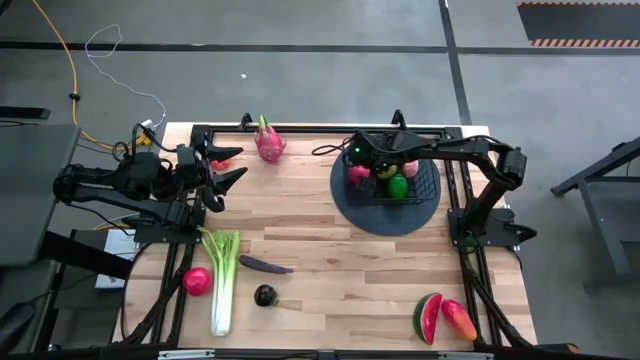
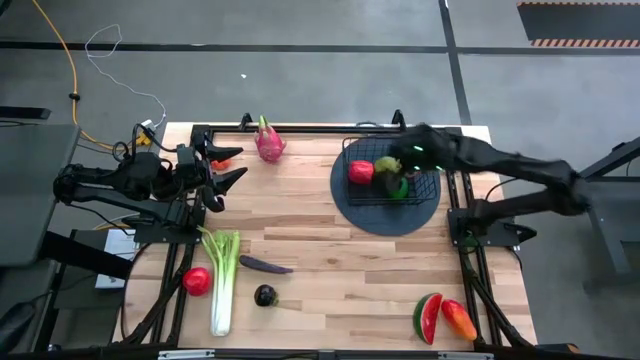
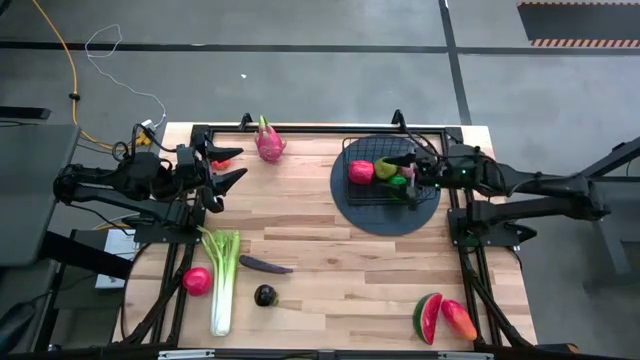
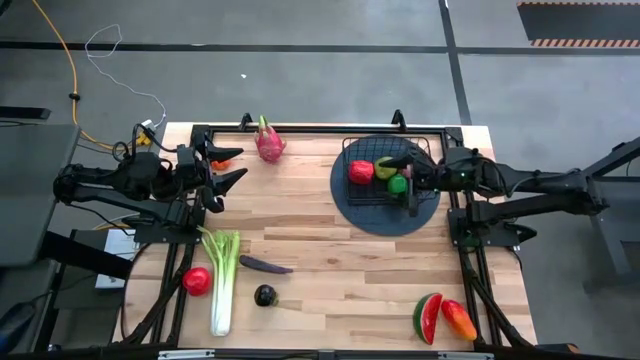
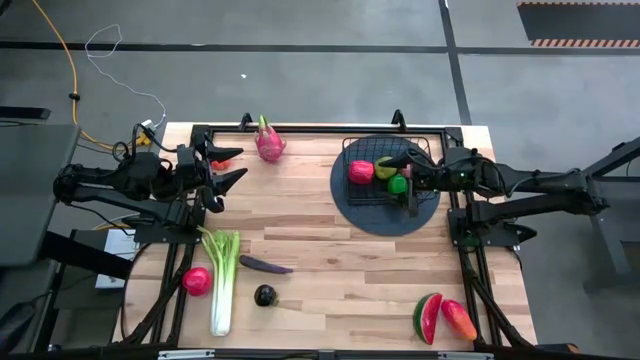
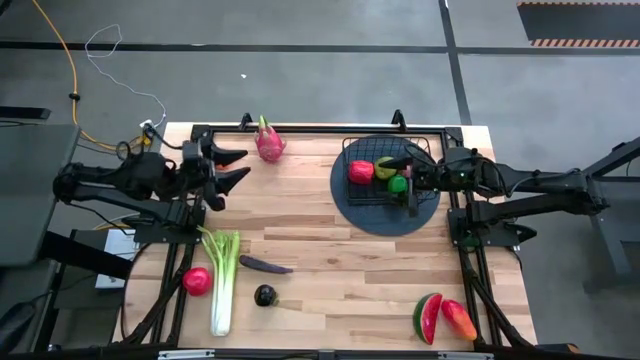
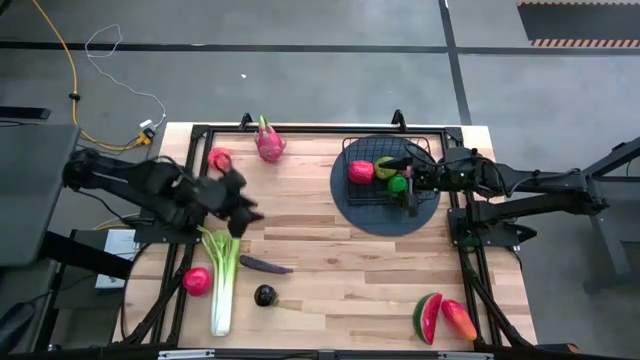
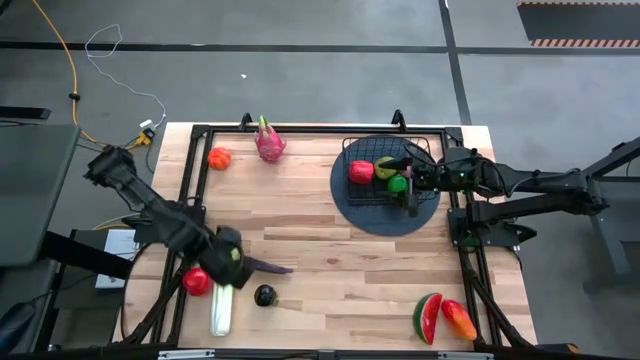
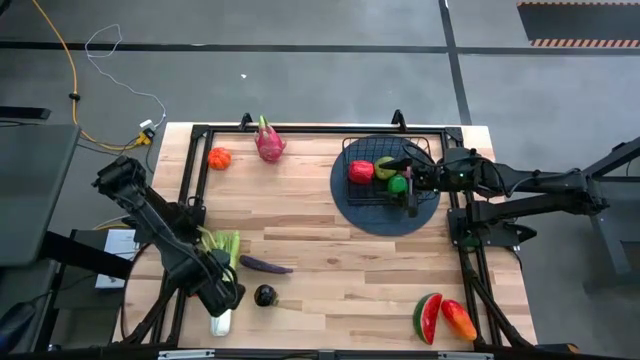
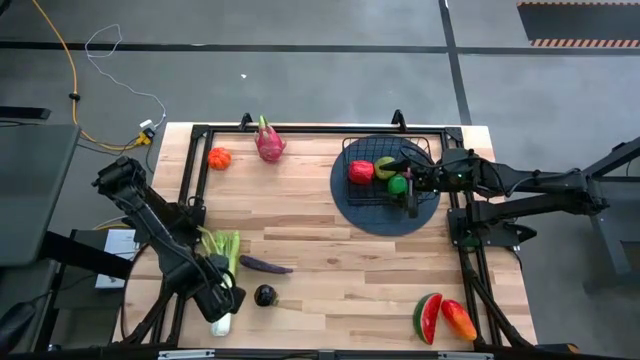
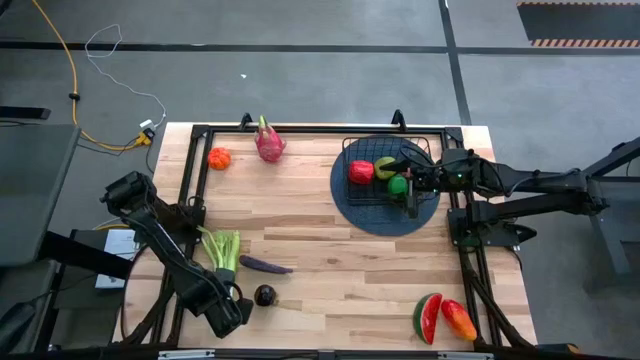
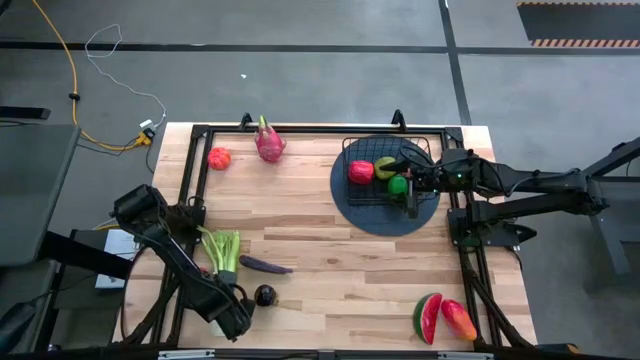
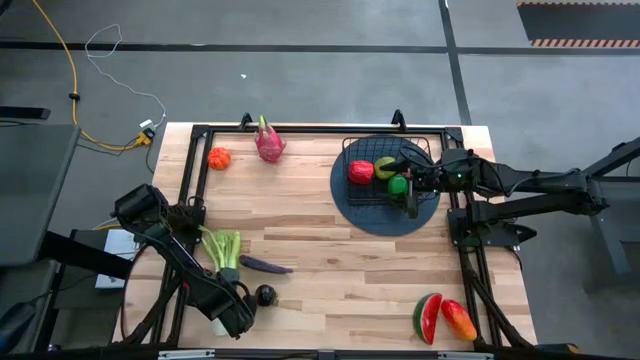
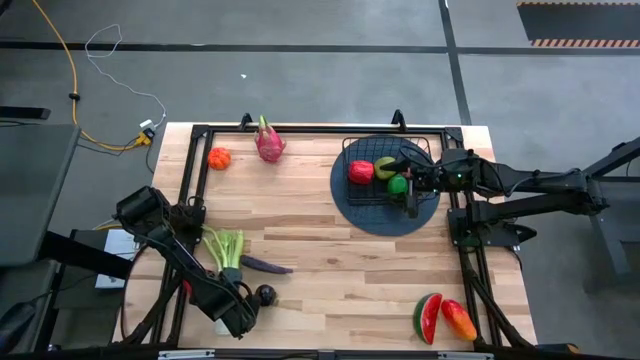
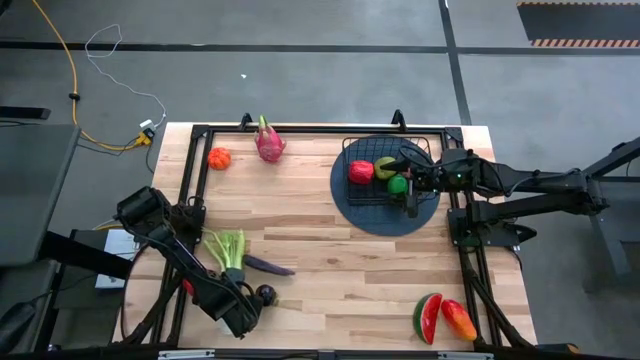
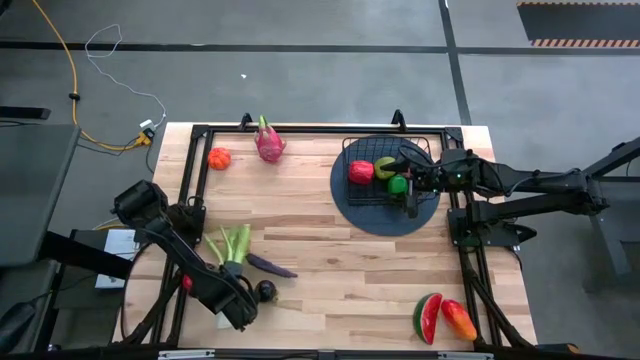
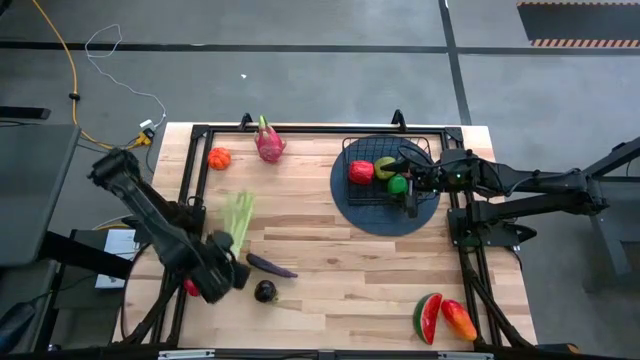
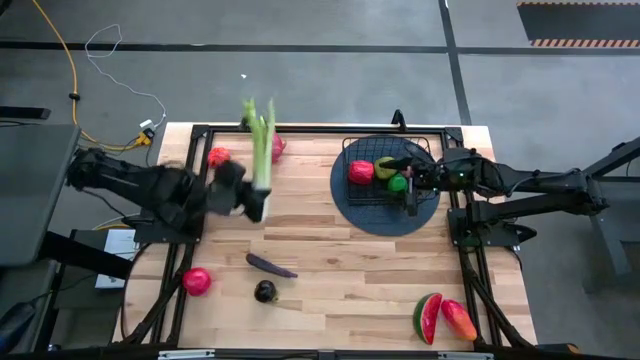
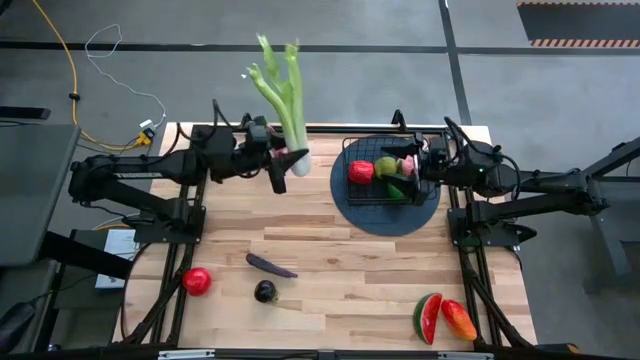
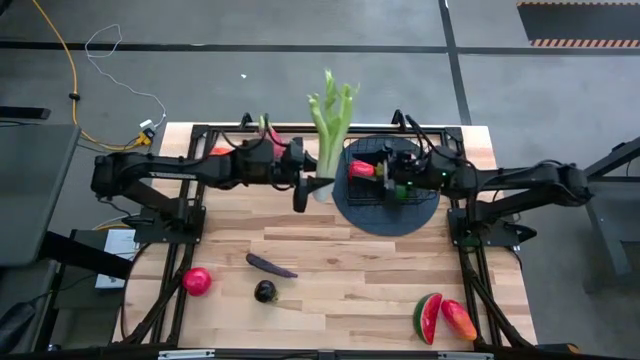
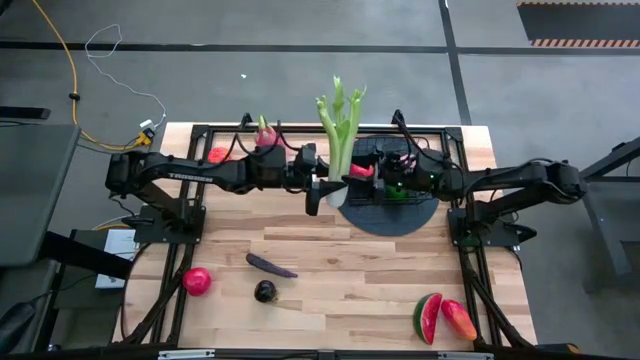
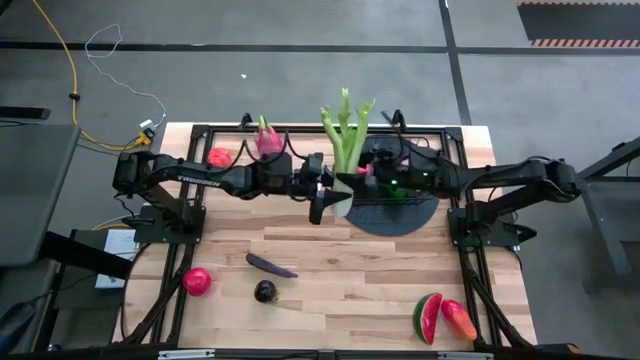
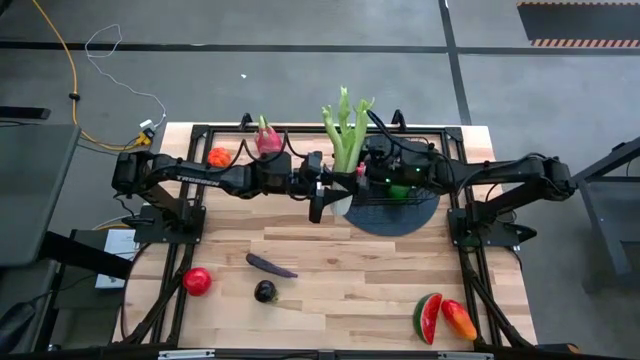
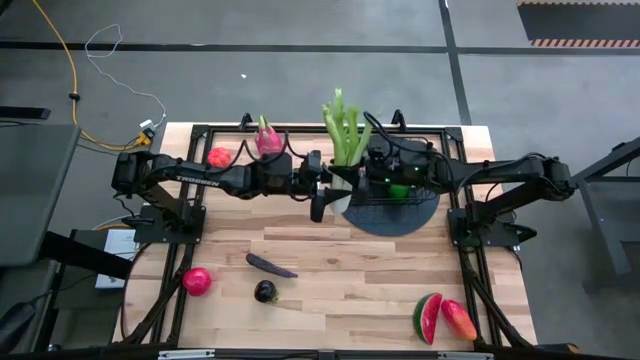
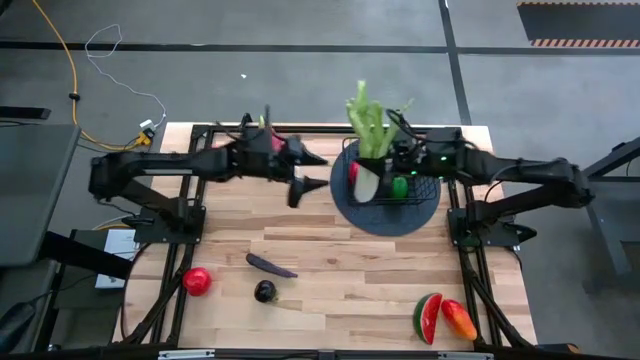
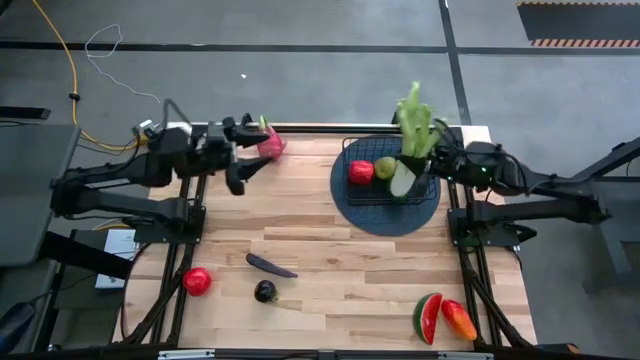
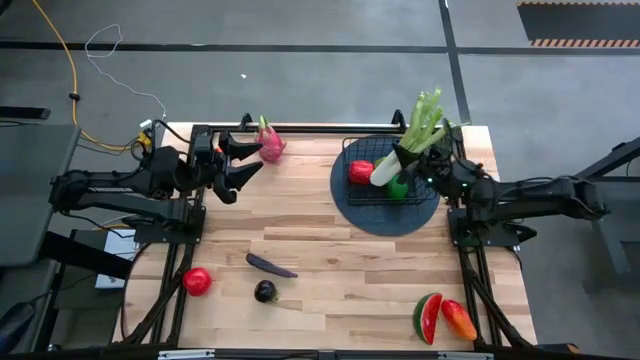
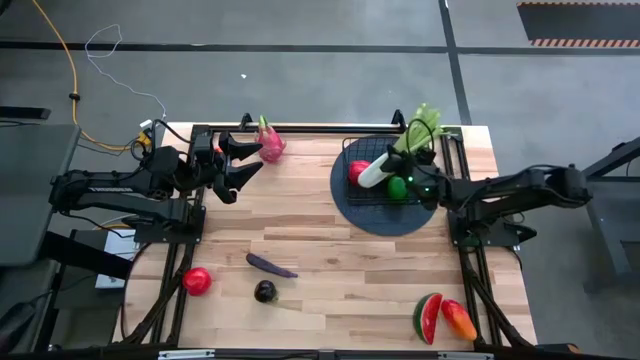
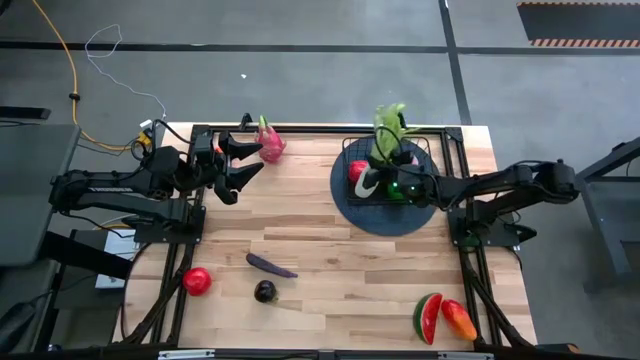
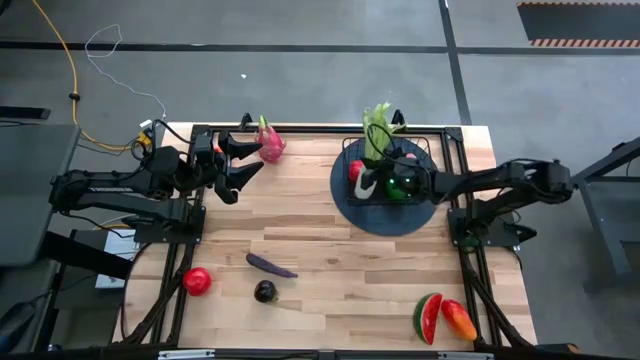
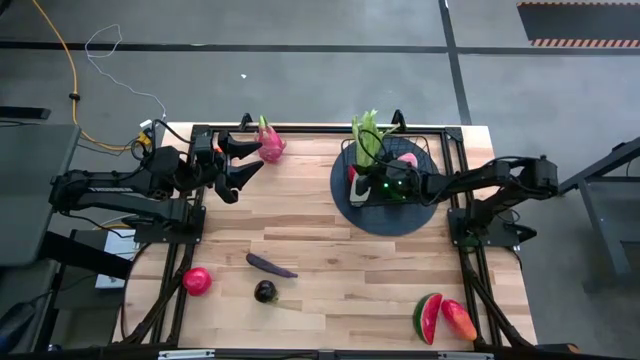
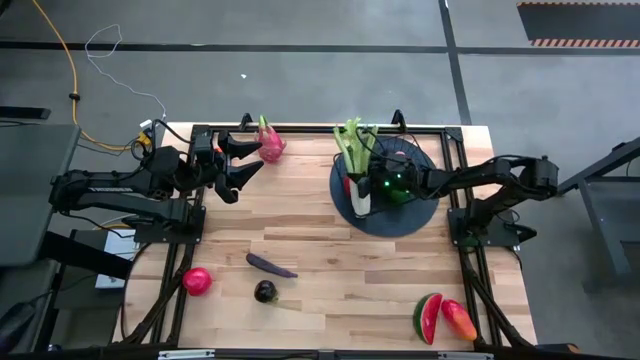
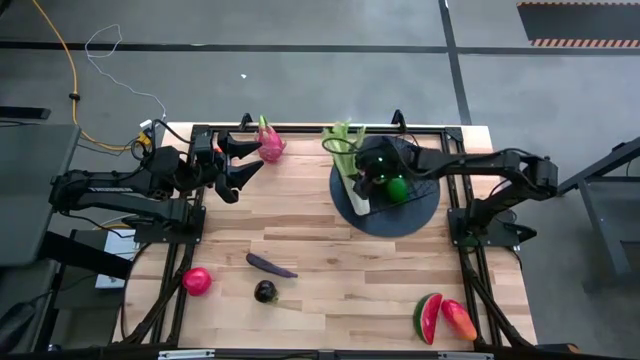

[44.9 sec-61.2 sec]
Task: Build produce basket
Put the celery into the wire basket

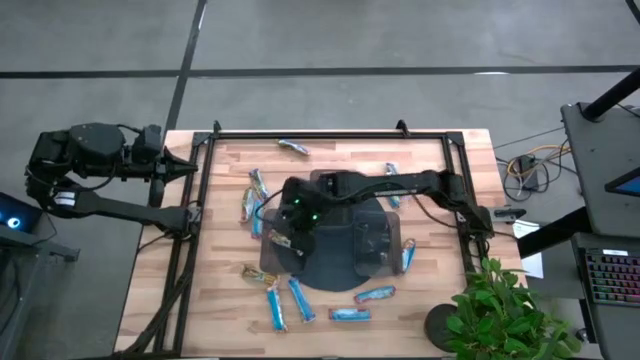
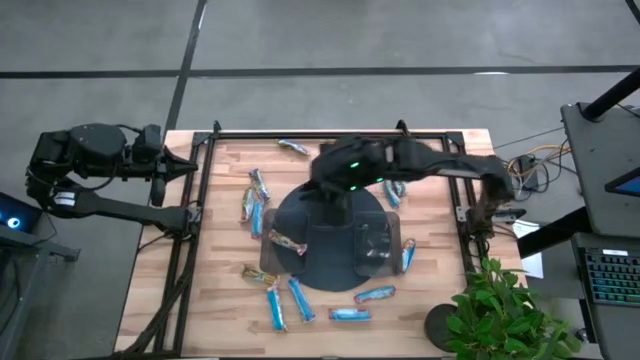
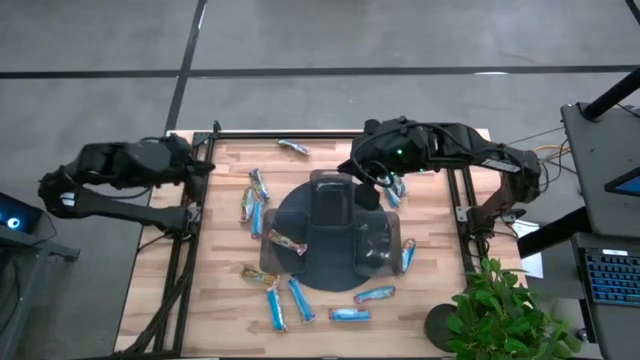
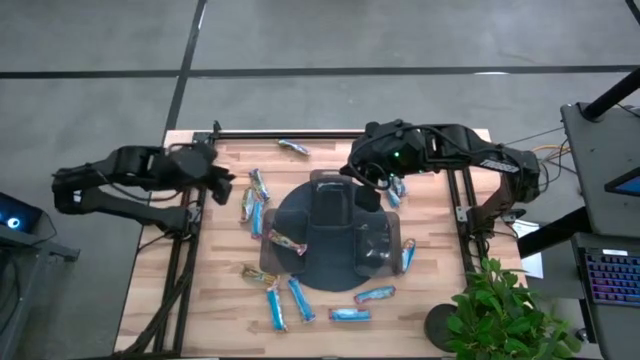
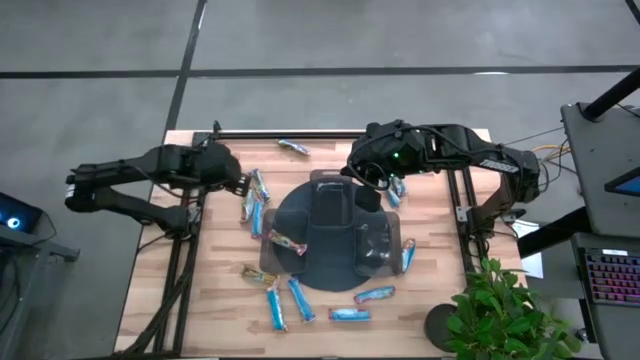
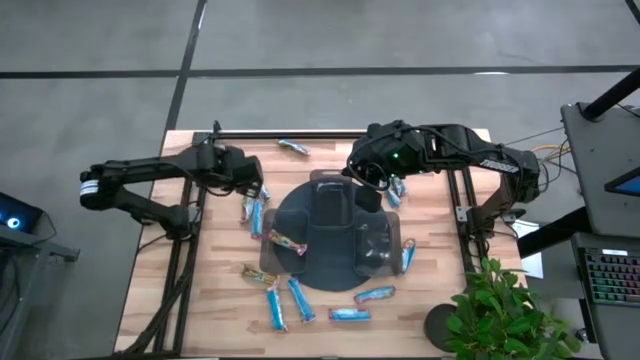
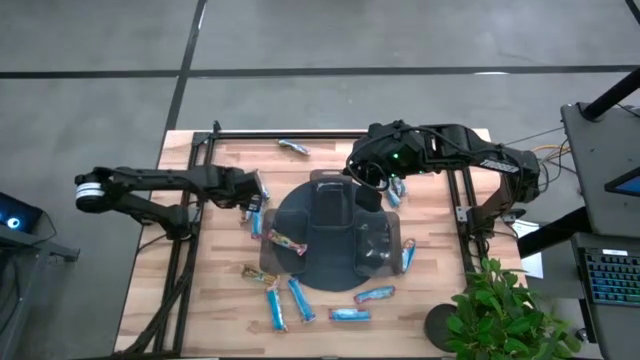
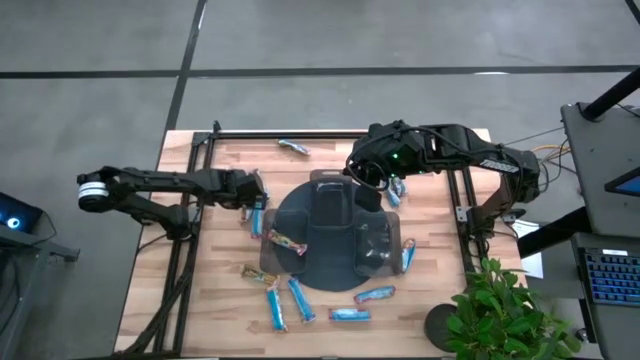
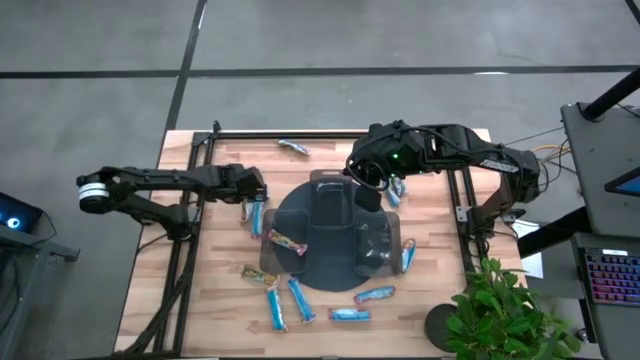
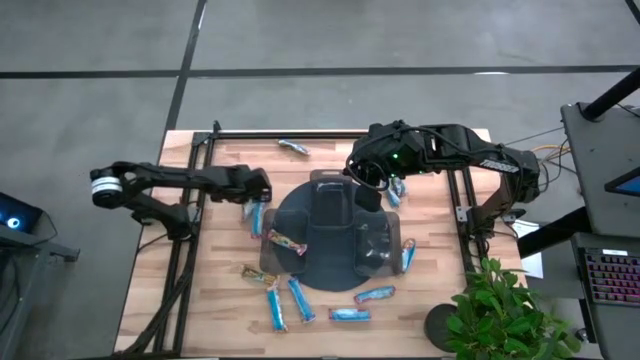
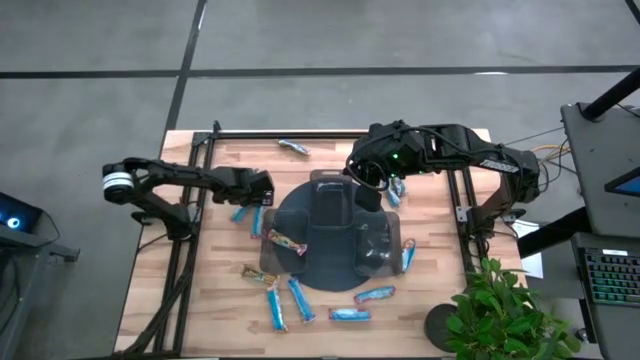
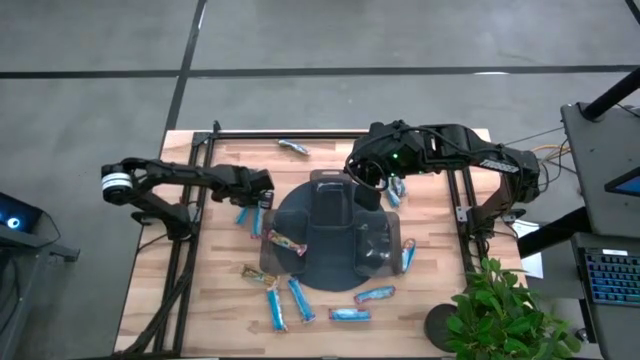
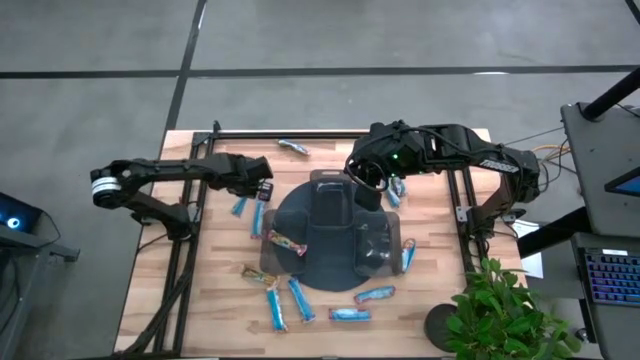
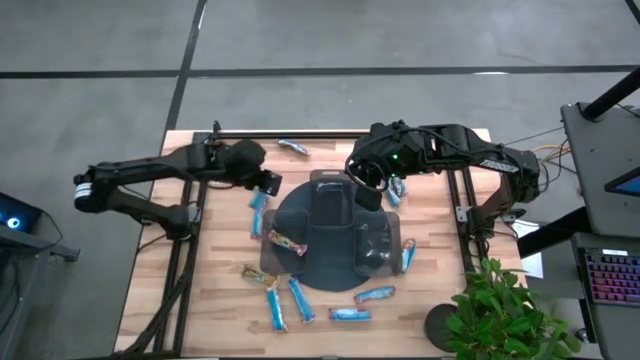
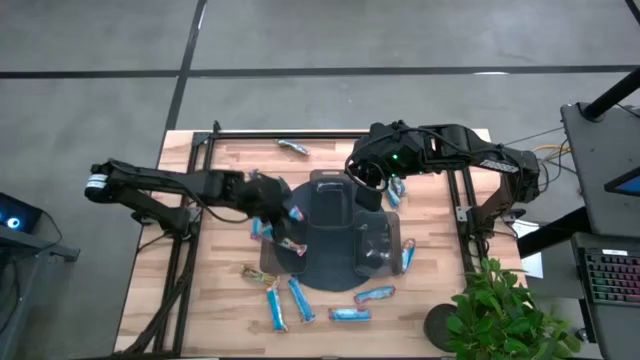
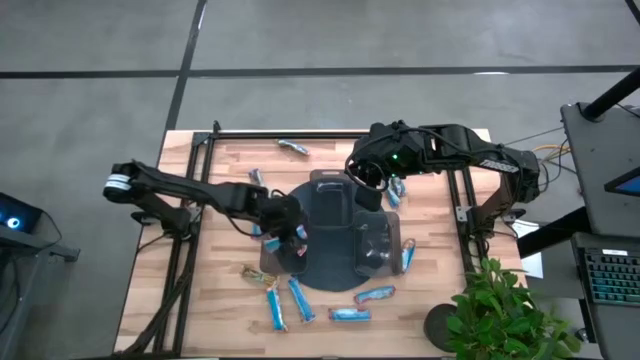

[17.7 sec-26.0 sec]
Task: Pick and place Granola Bars by type
Put the red granola bar into the bottom left black bin
